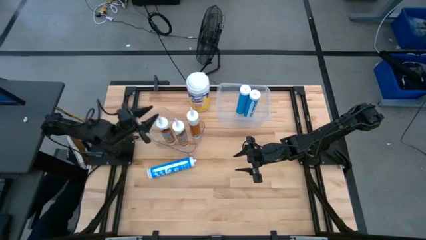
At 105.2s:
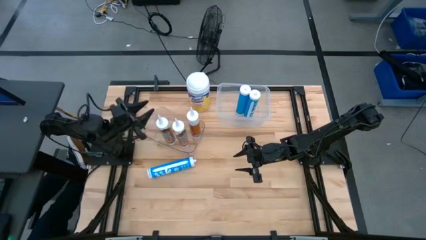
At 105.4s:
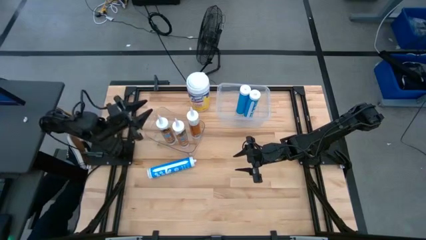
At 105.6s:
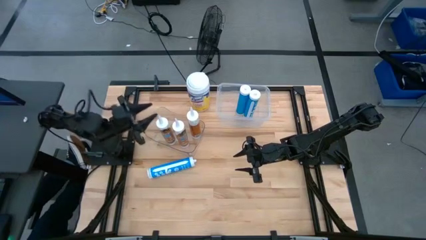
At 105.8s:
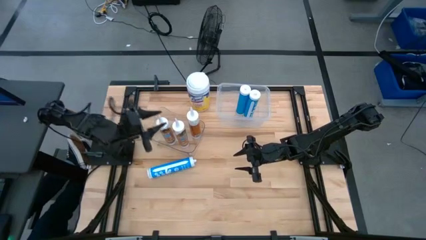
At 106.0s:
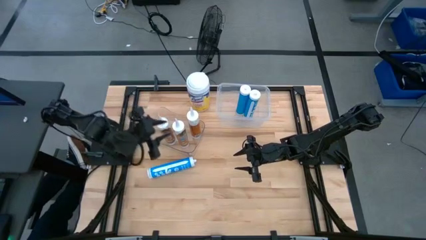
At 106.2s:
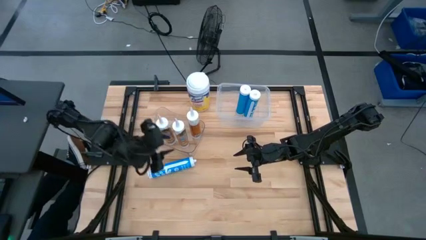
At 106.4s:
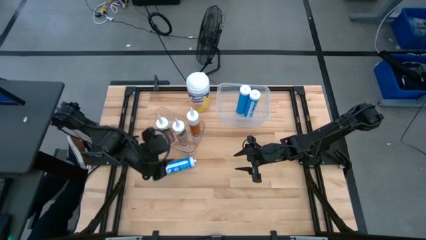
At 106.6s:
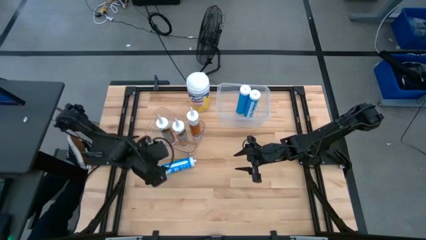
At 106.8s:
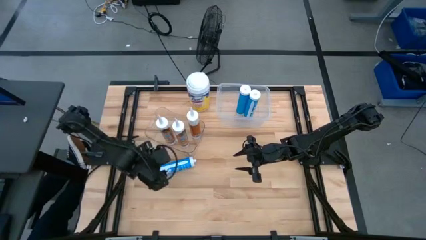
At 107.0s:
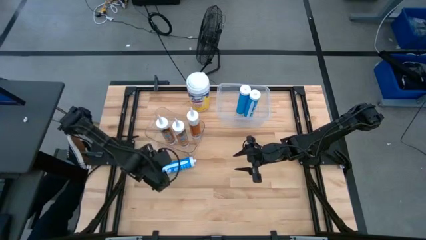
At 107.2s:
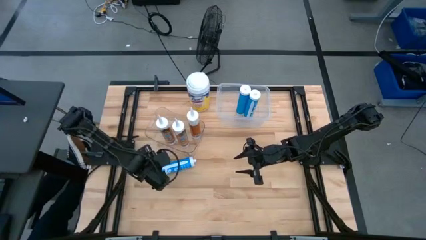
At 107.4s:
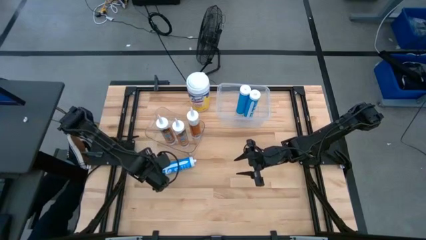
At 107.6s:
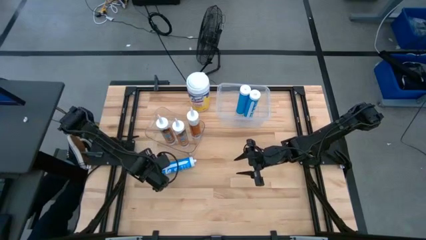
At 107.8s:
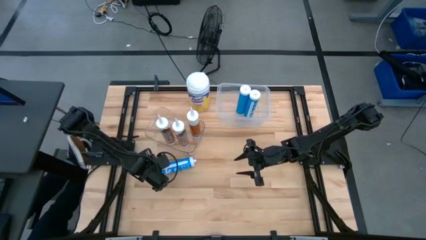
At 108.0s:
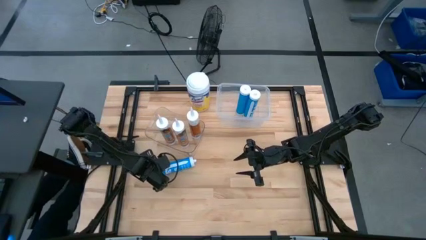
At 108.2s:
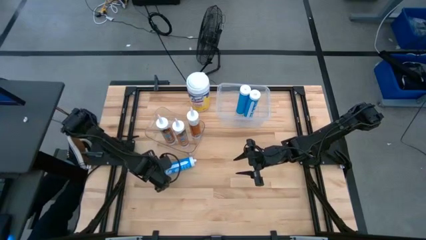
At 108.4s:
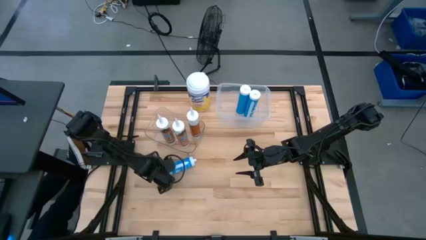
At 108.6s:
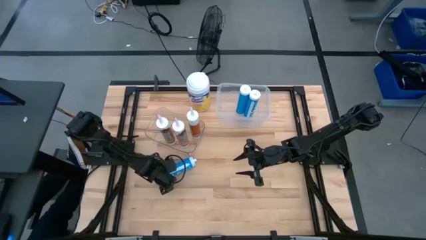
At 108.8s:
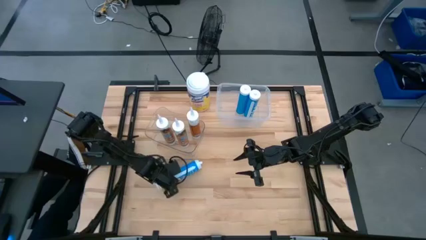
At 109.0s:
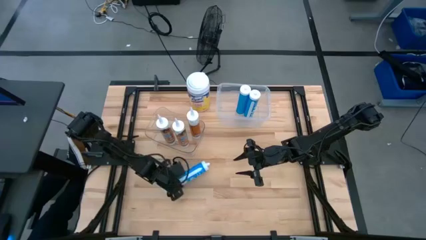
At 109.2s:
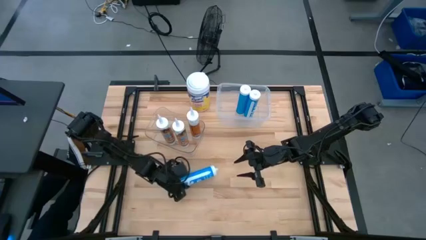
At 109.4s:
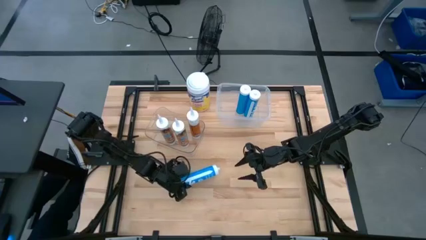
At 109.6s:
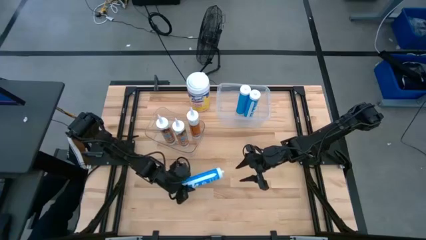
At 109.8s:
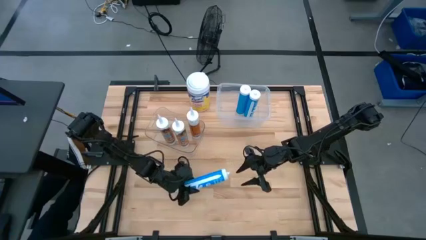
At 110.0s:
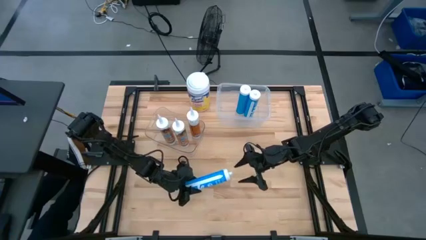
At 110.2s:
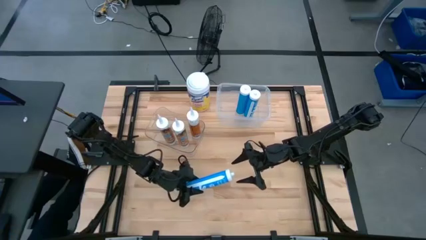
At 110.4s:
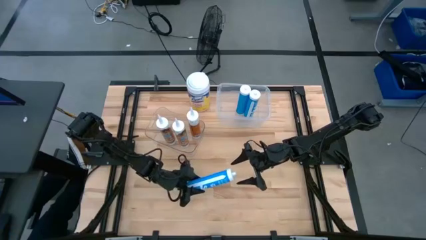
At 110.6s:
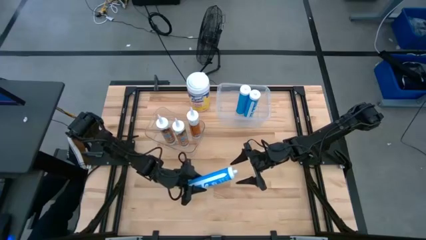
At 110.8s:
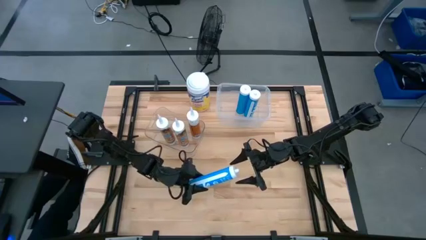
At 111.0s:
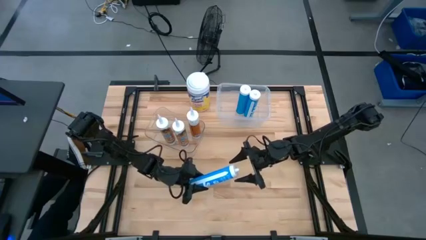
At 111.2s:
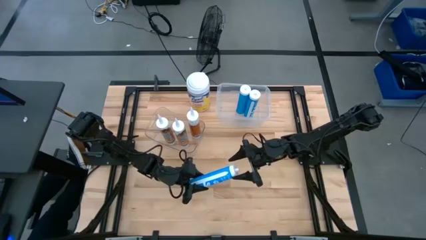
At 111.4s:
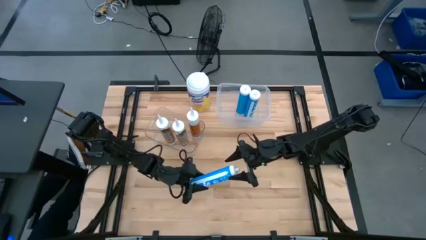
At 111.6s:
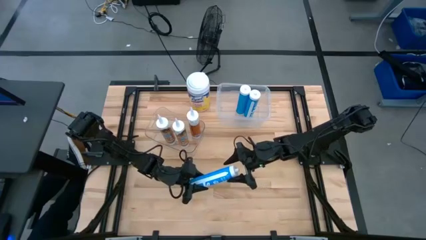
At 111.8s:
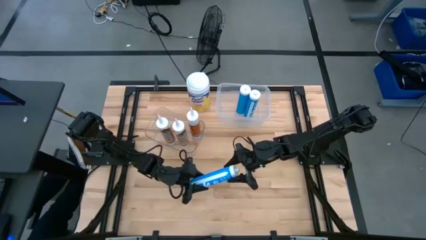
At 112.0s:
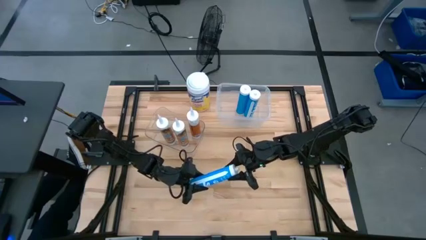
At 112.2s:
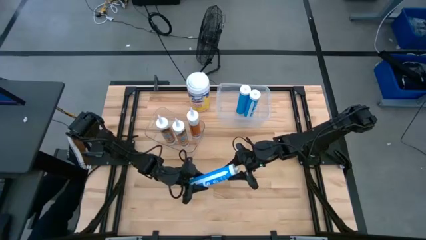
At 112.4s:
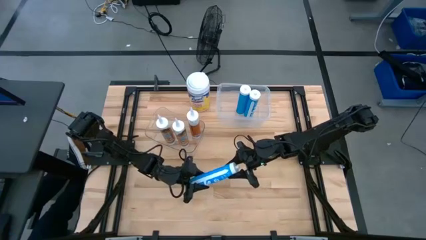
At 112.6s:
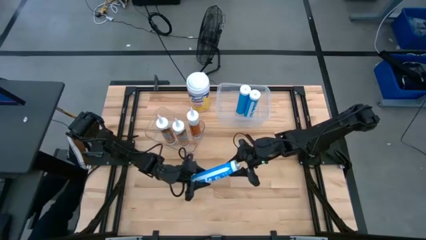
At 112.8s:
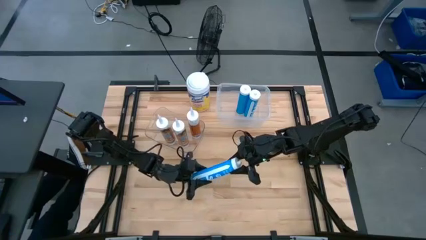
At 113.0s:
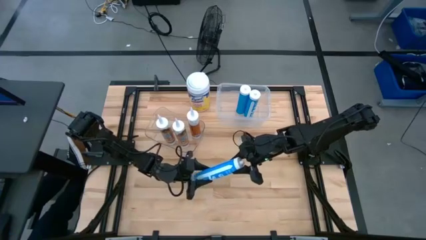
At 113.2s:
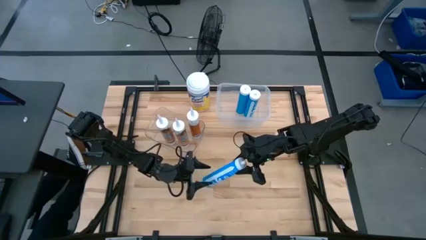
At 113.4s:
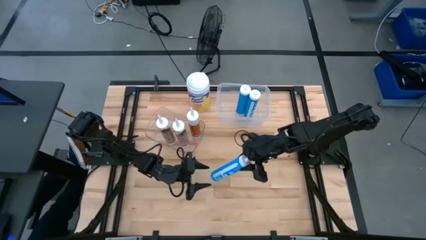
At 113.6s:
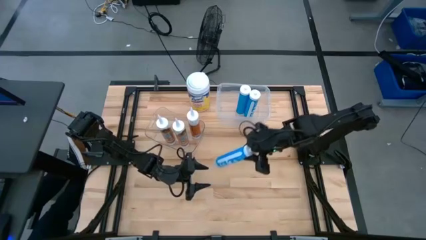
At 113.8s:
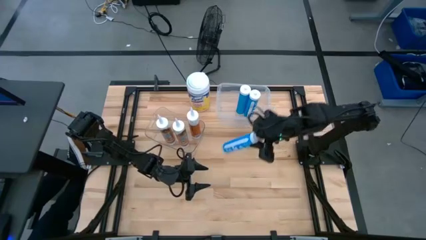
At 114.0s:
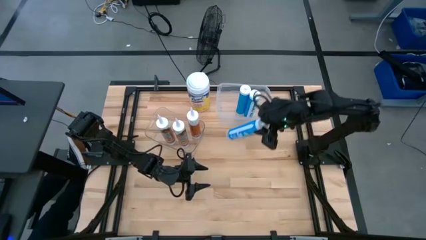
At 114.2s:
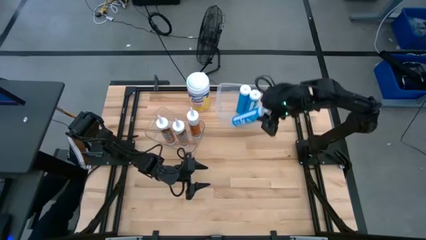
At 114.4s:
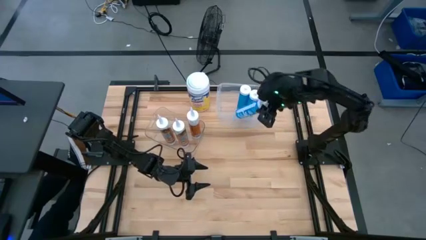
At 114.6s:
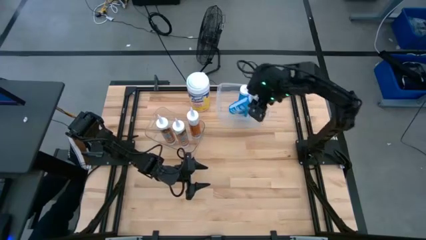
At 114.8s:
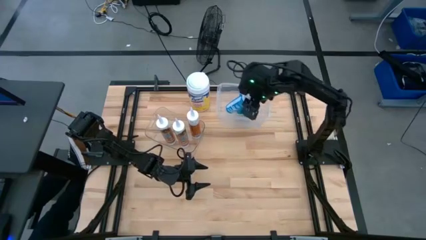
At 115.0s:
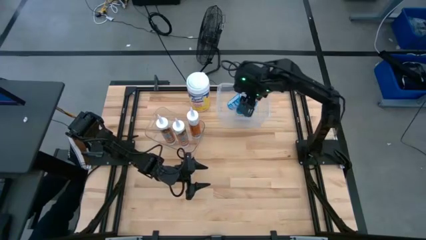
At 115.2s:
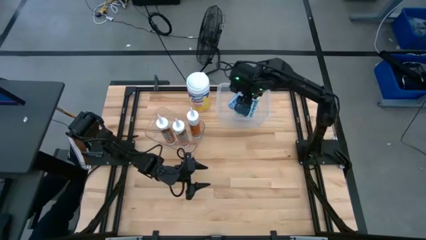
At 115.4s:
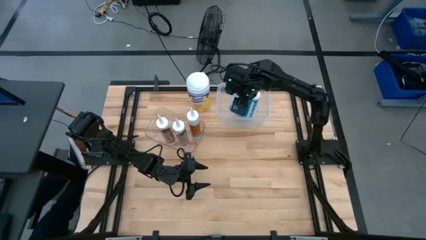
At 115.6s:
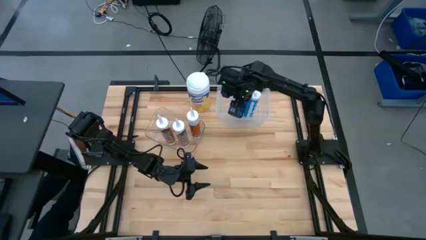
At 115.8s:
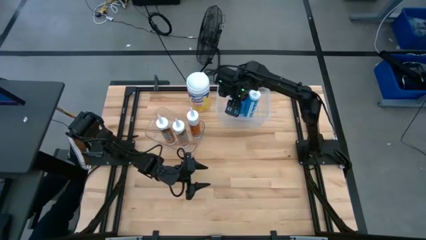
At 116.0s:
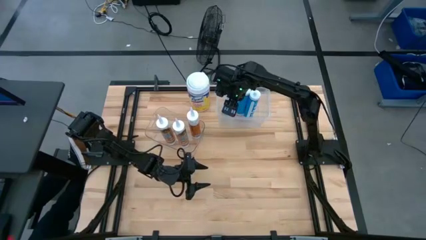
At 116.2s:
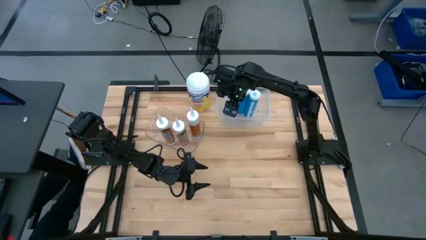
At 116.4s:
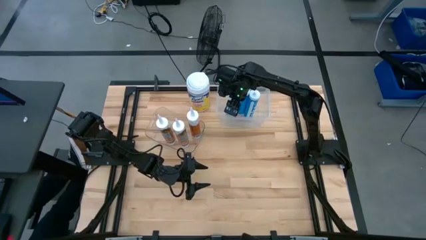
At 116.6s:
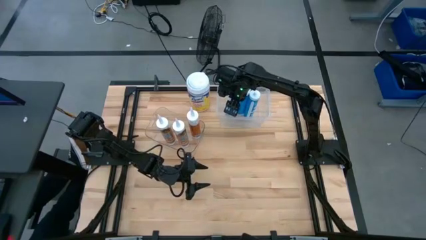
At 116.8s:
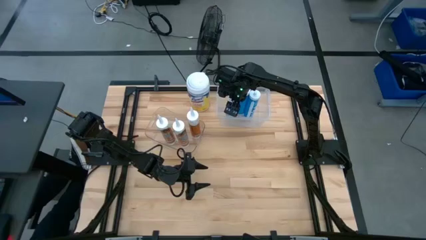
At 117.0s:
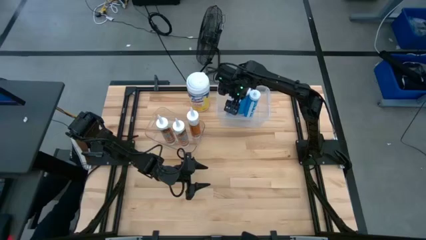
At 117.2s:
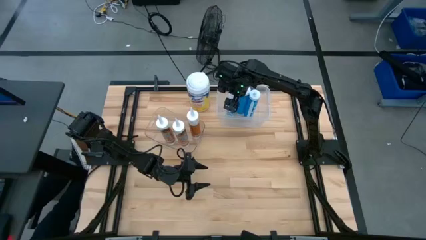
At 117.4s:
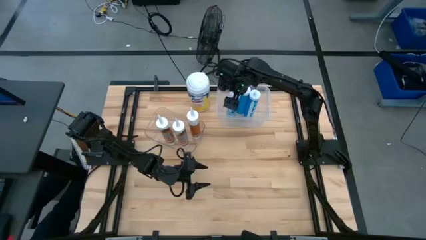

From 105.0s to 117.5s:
Task: Pick & place silicon tubes, Sealant and Lysol wipes
Put the blue sealant into the top transparent bin

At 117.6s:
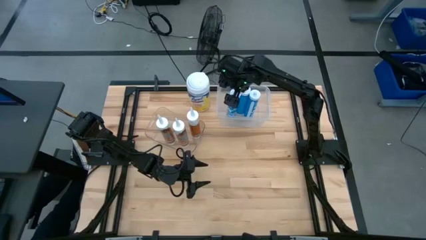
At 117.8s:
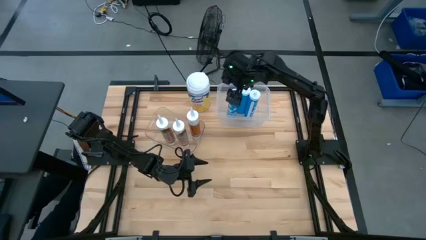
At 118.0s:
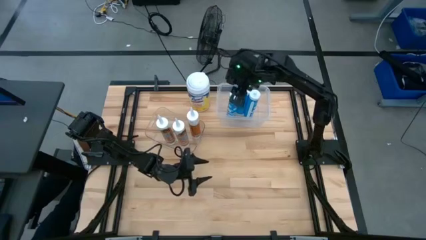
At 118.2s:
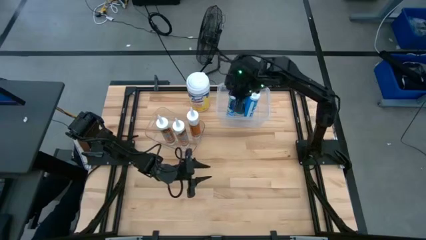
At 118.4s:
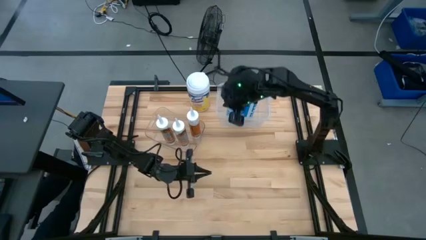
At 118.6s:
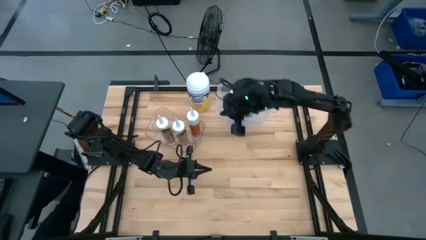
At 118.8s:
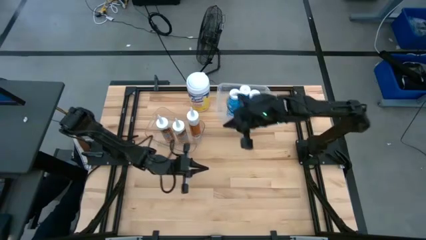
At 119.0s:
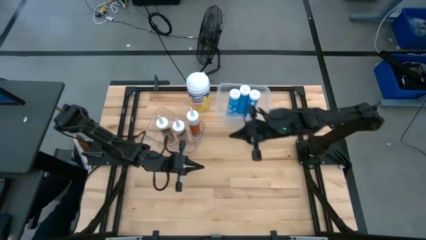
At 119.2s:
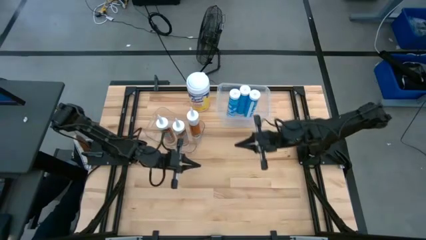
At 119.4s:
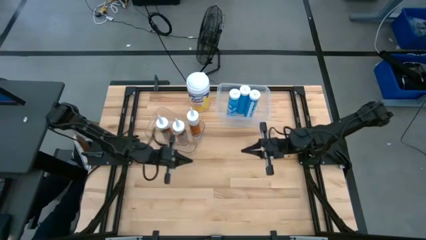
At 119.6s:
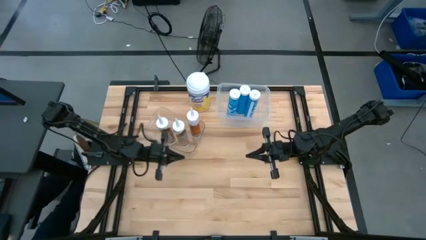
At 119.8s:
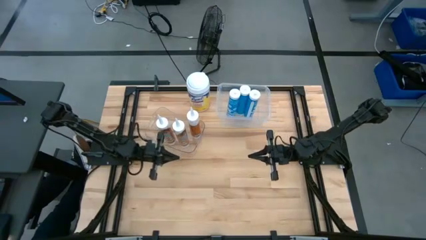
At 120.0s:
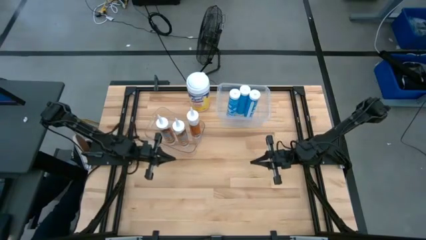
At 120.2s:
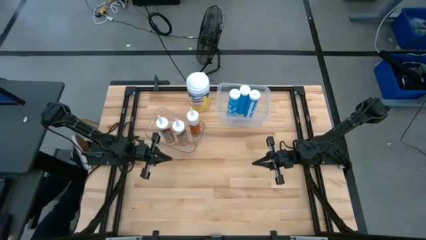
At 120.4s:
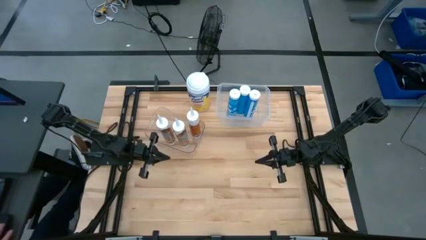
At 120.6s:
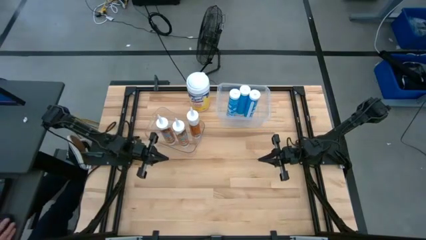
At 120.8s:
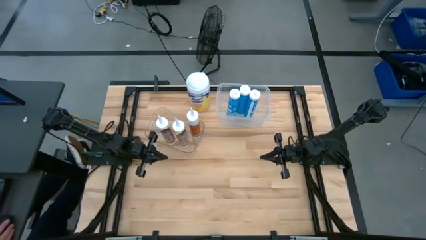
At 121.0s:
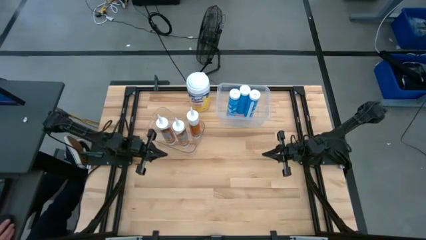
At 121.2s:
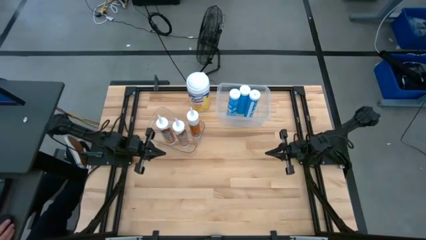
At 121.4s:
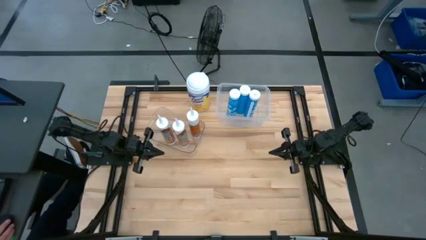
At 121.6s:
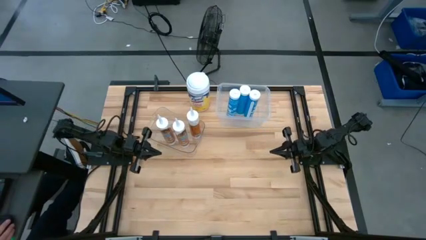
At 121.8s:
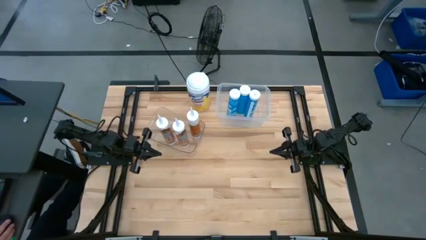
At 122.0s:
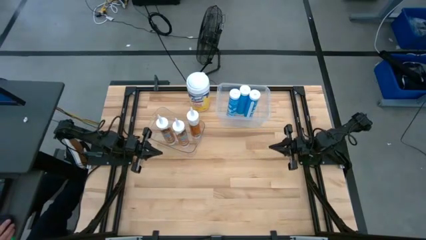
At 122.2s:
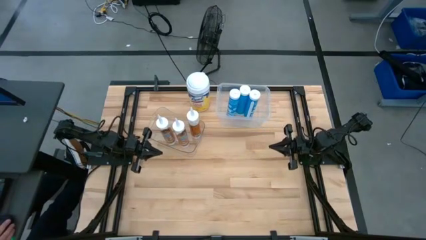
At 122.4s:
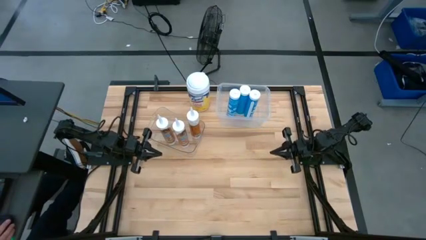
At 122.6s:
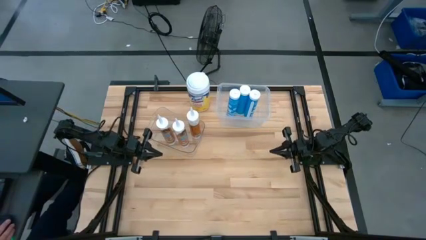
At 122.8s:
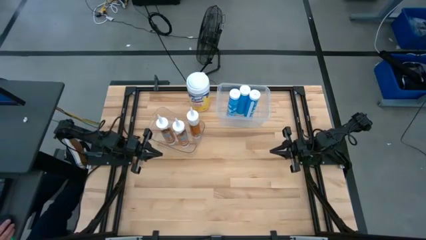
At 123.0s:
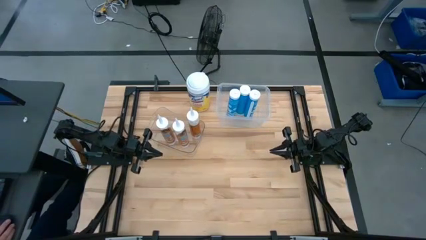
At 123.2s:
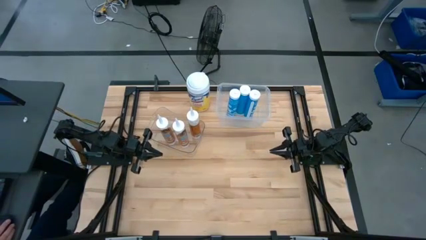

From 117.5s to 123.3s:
Return to Home Position
